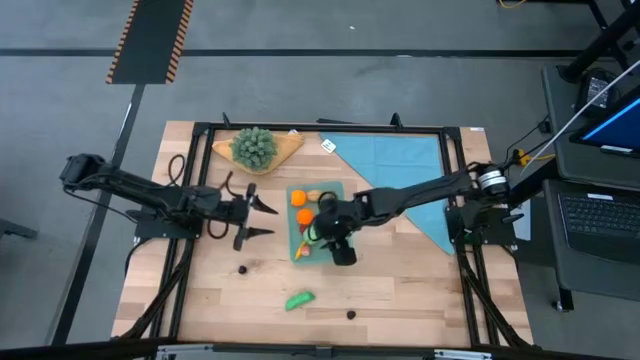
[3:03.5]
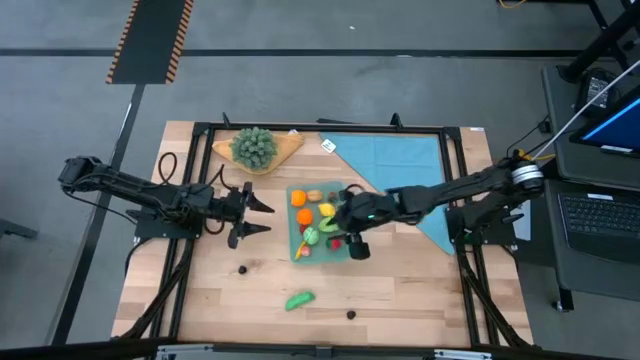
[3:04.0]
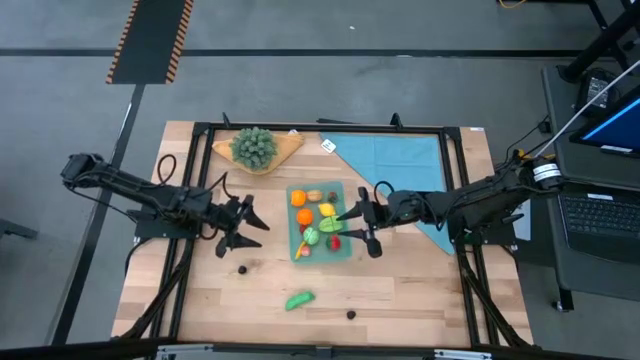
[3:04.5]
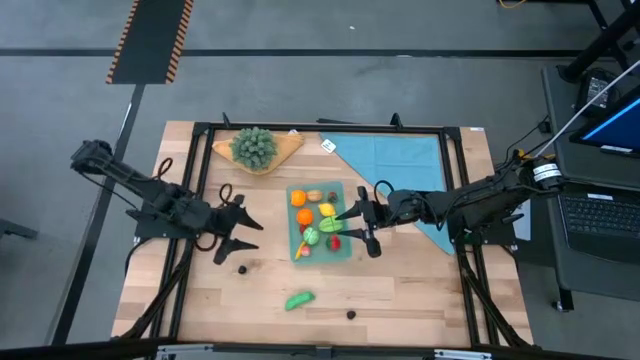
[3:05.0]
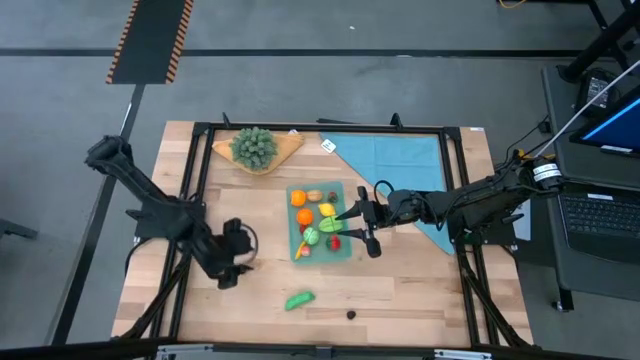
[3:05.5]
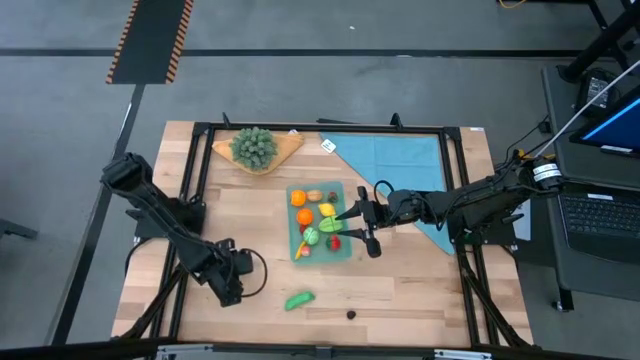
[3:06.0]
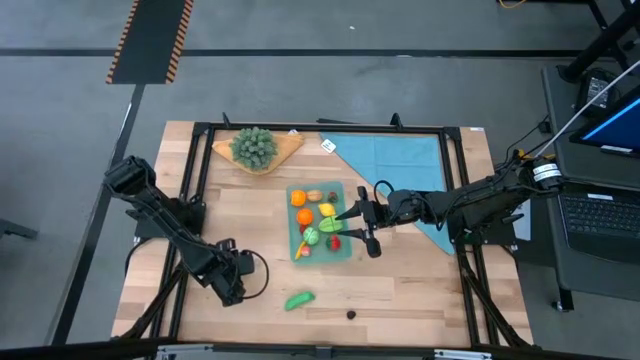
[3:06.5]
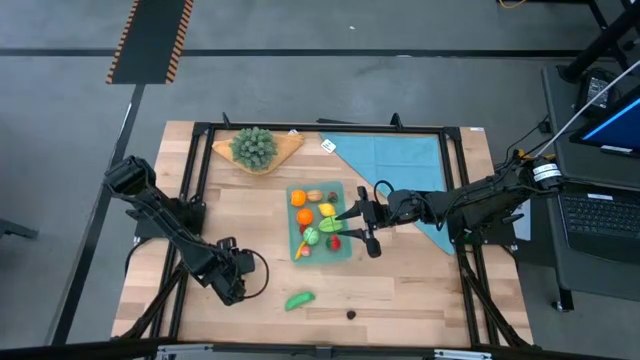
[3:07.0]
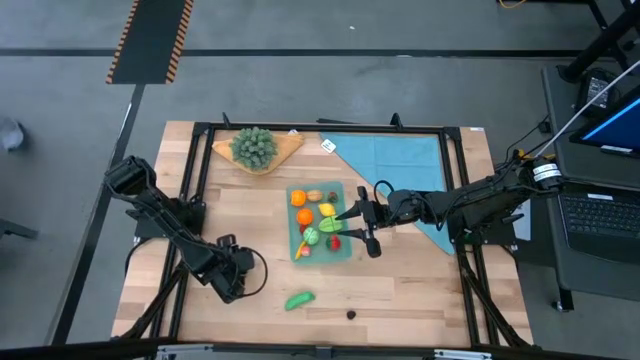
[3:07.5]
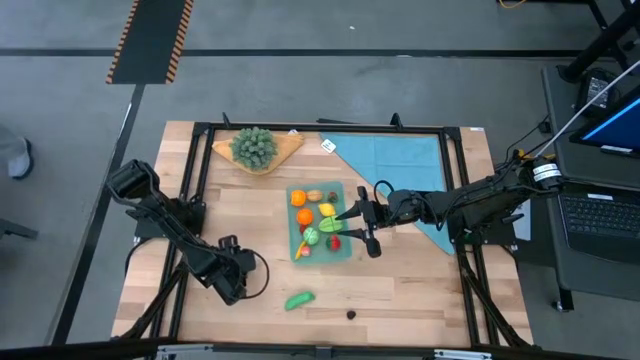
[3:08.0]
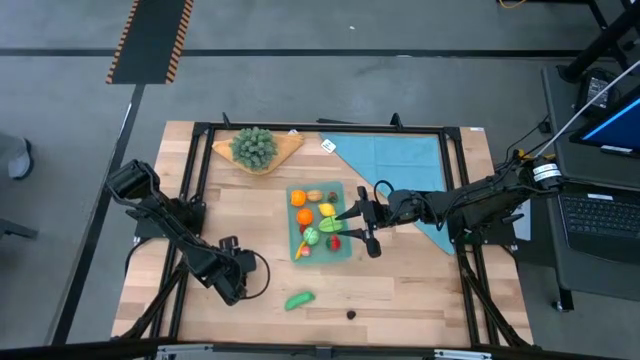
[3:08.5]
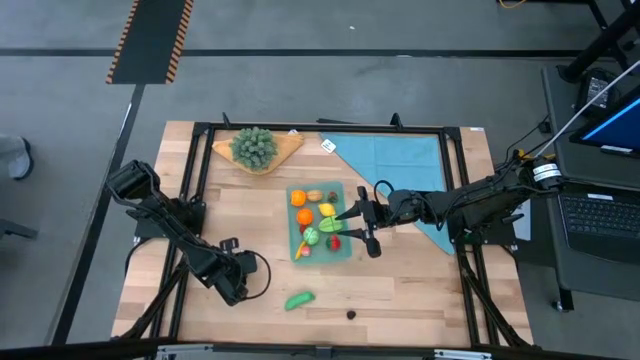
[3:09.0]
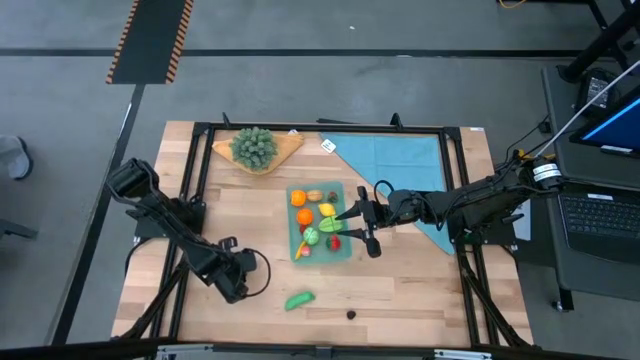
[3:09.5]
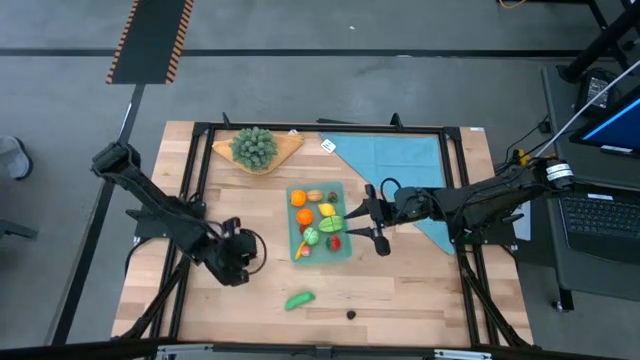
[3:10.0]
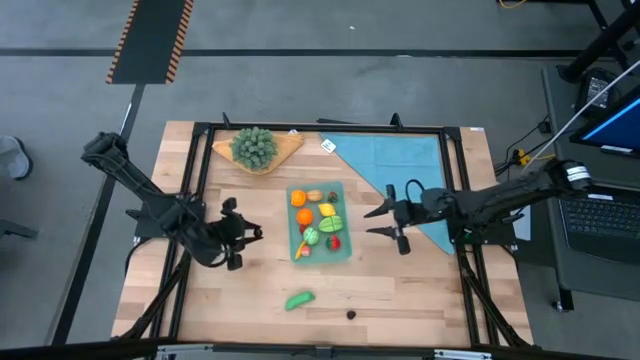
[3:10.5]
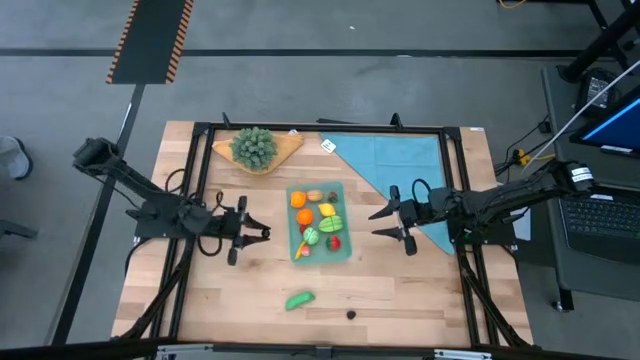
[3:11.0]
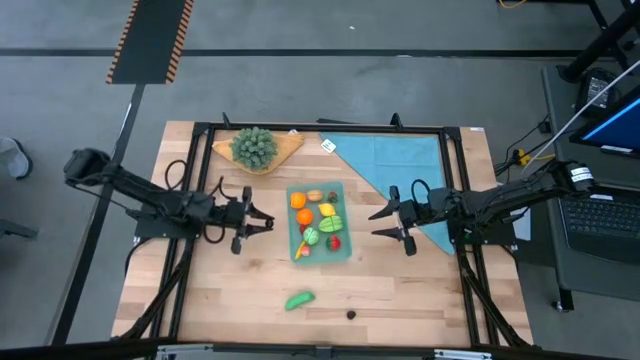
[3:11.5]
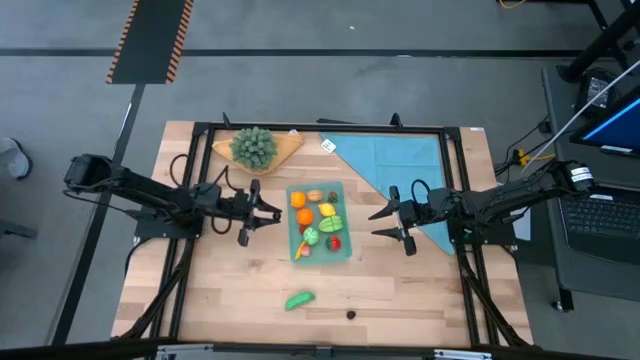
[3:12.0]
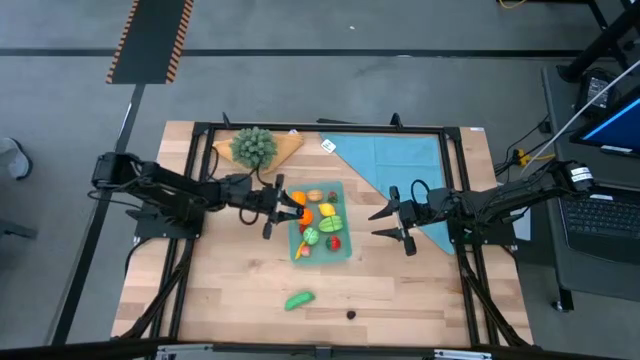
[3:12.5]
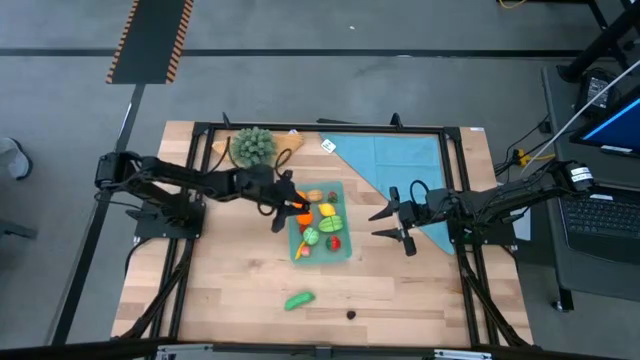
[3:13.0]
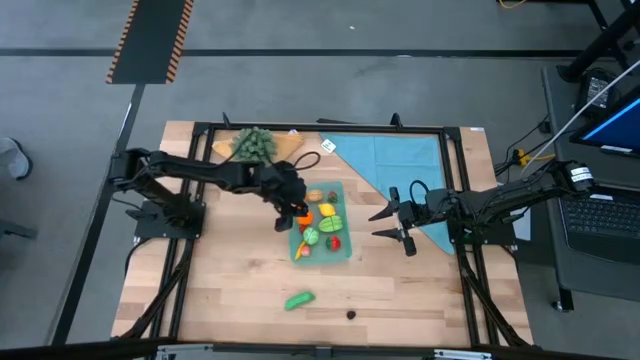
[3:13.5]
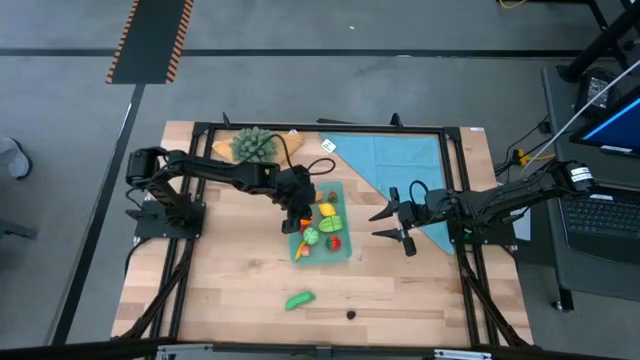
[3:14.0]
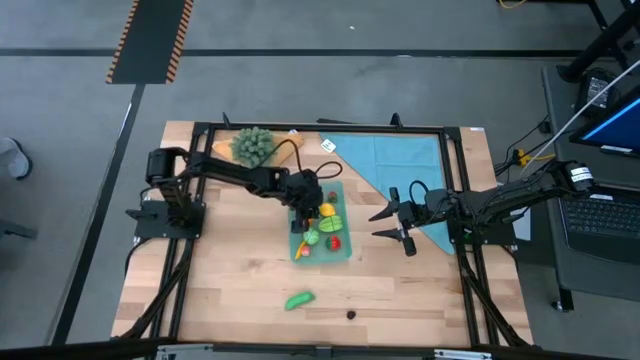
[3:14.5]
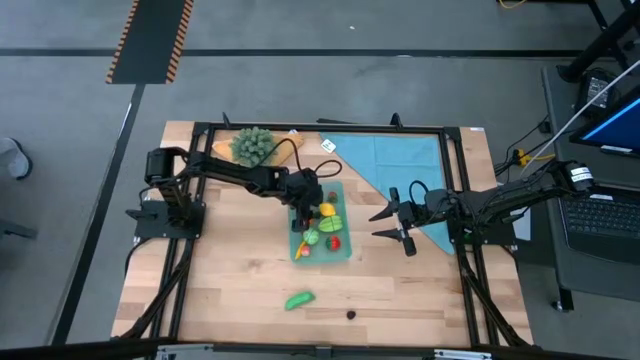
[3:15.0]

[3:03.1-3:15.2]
Task: Pick and placing Produce into tupperware
Put the cherry into the bin

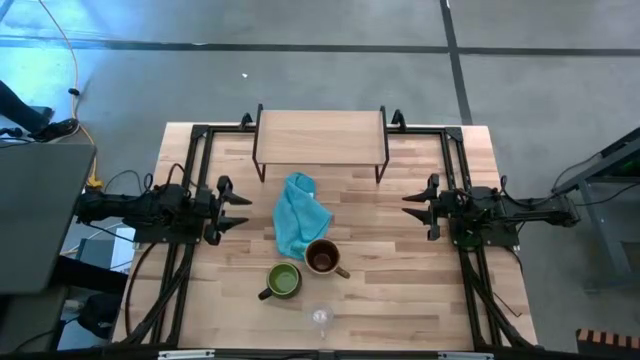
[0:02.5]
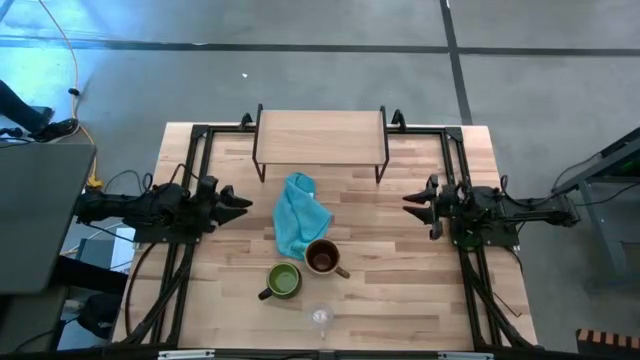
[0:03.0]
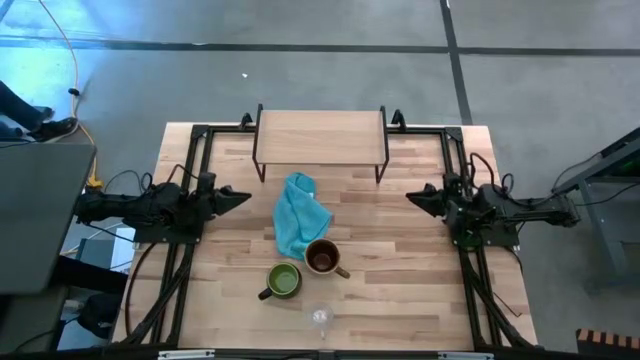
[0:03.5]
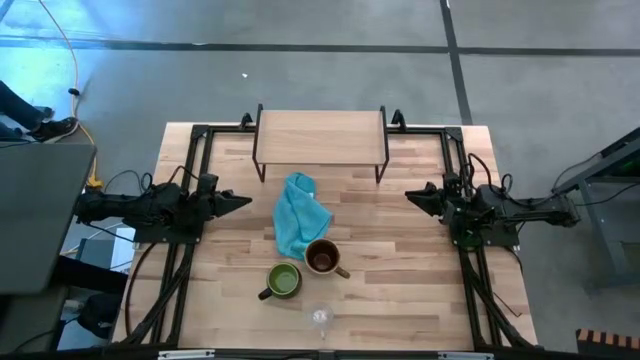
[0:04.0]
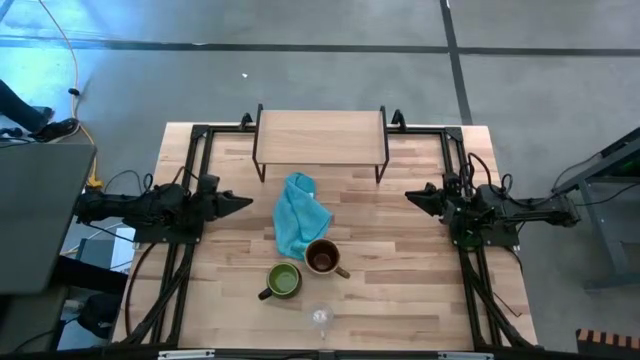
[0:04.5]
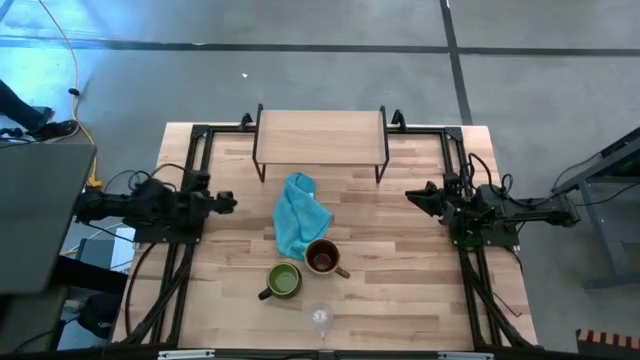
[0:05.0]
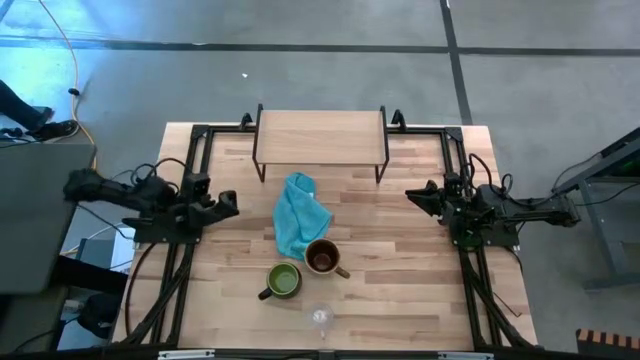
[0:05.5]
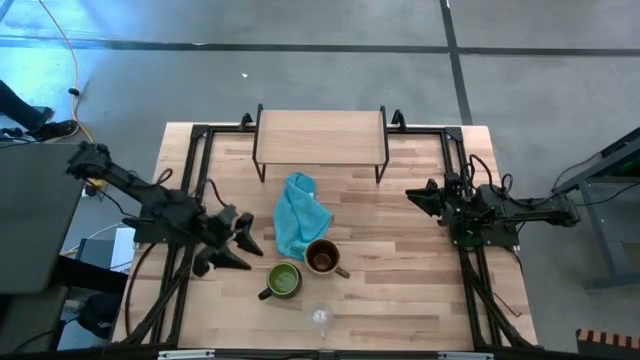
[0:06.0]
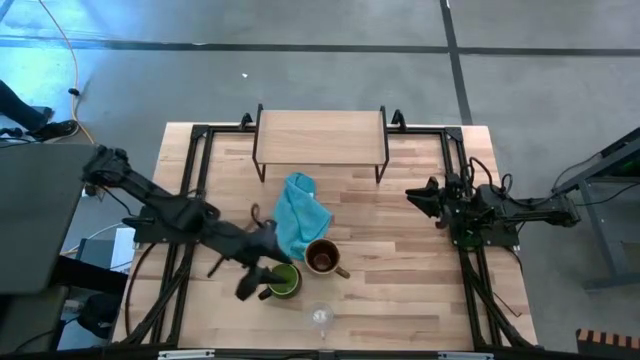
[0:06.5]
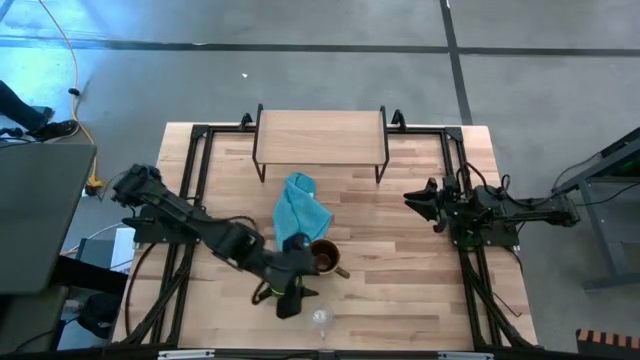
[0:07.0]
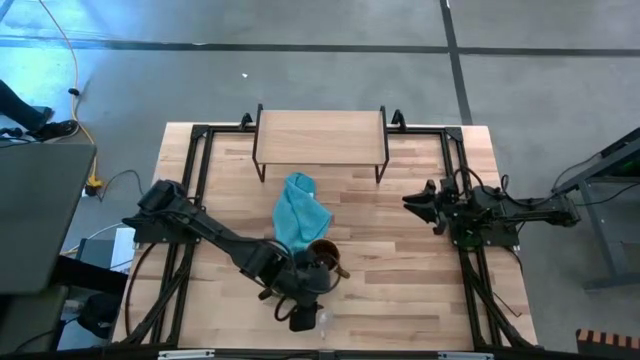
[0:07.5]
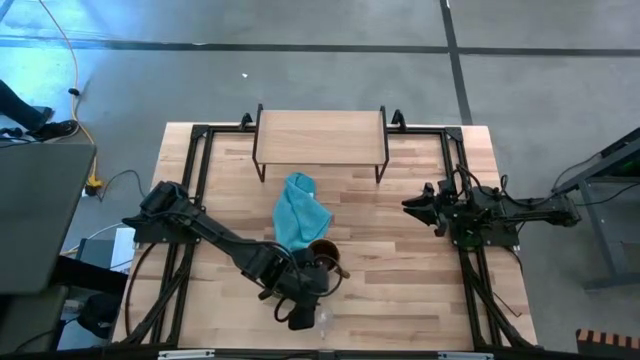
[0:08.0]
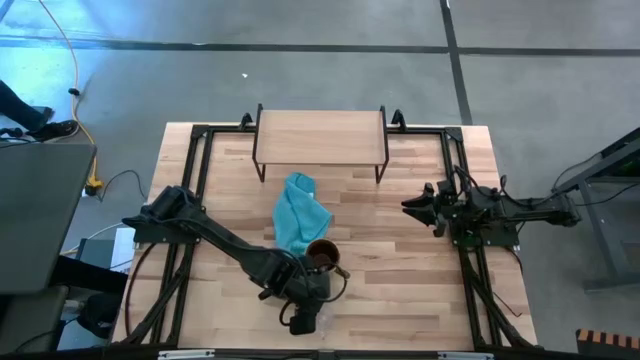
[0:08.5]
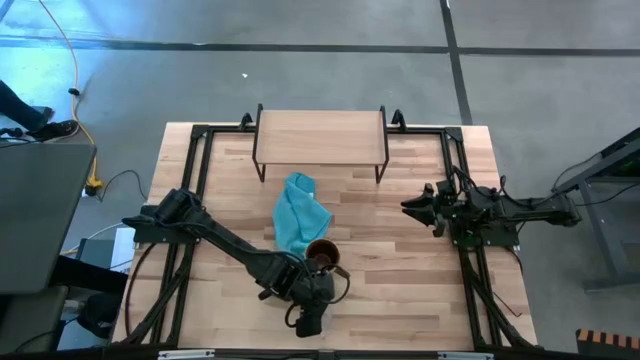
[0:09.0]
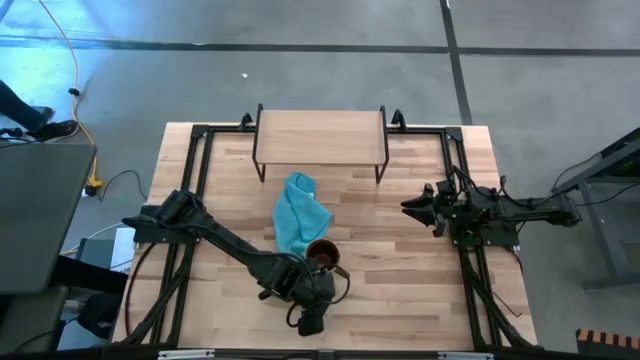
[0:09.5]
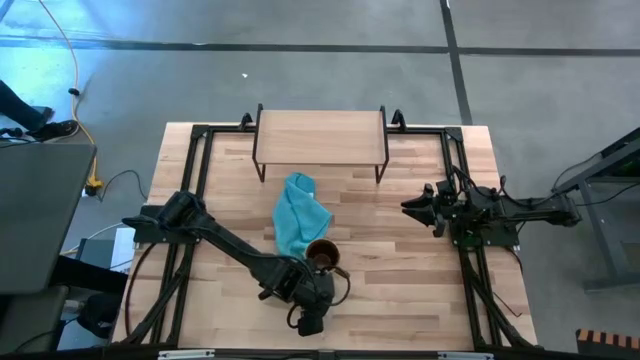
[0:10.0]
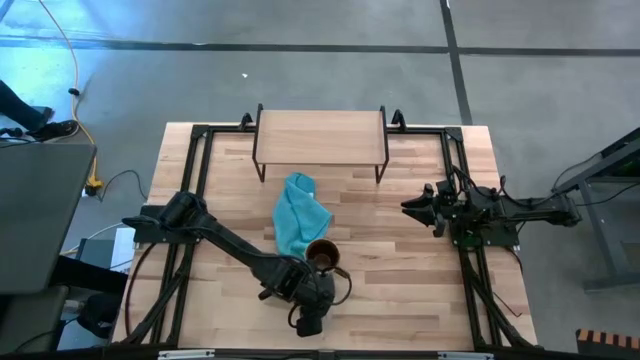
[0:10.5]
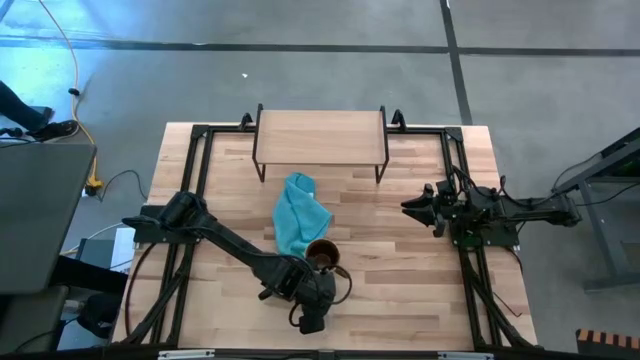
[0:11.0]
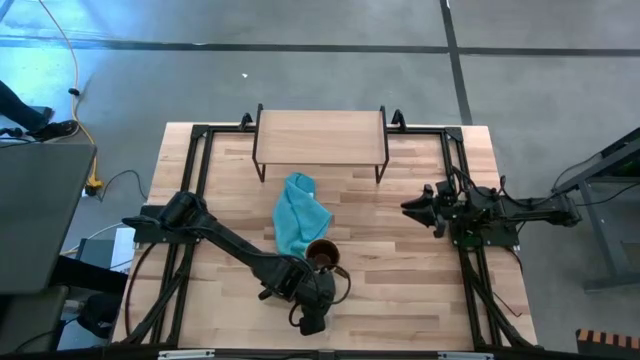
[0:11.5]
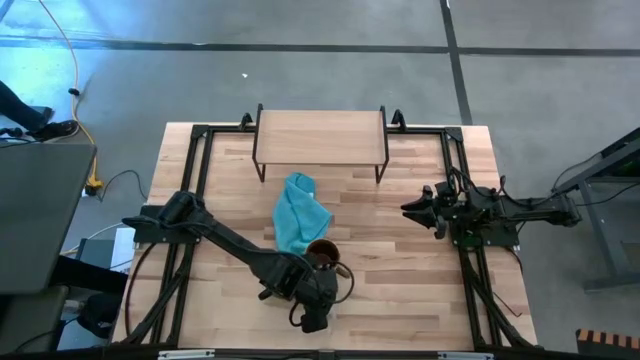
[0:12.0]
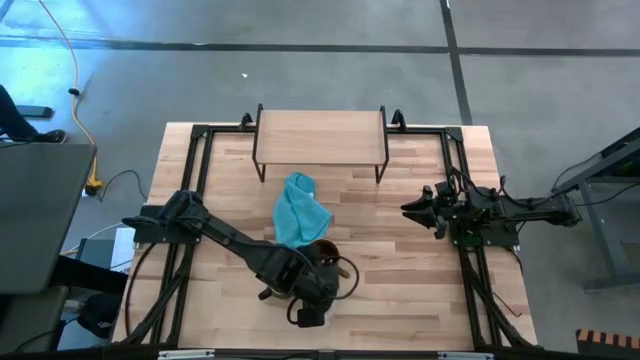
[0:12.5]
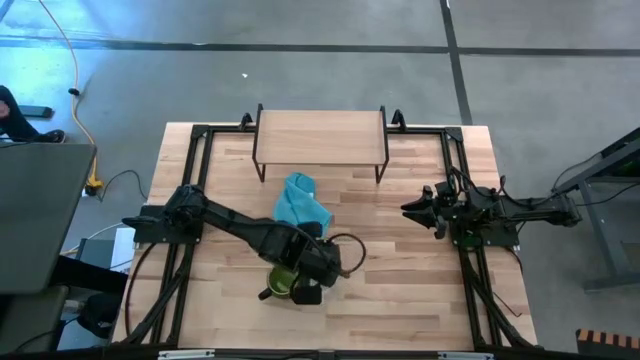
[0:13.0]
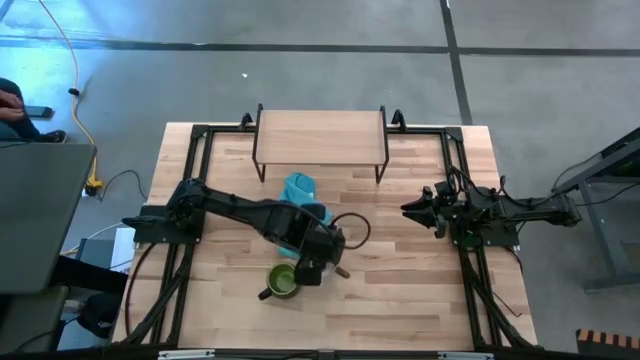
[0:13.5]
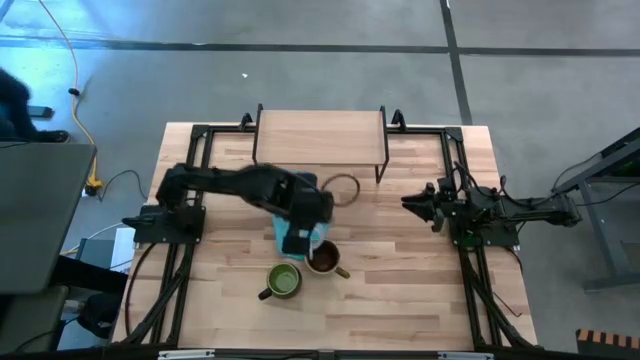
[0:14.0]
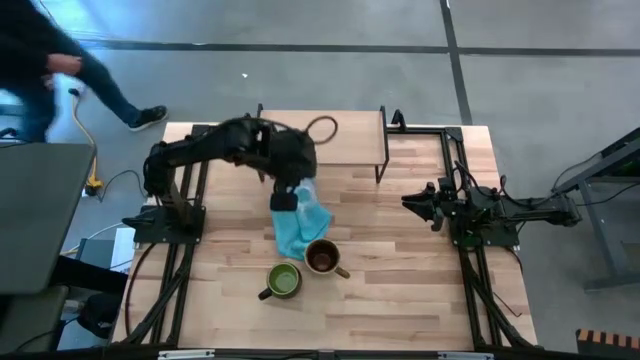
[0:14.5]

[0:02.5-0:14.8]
Task: Stack small to large cups/mugs on shelf
Put the transparent mug on the shelf
